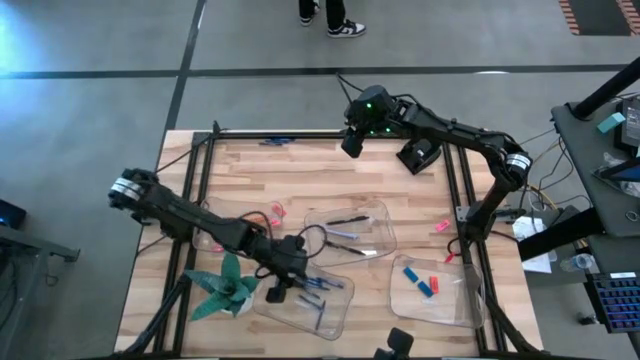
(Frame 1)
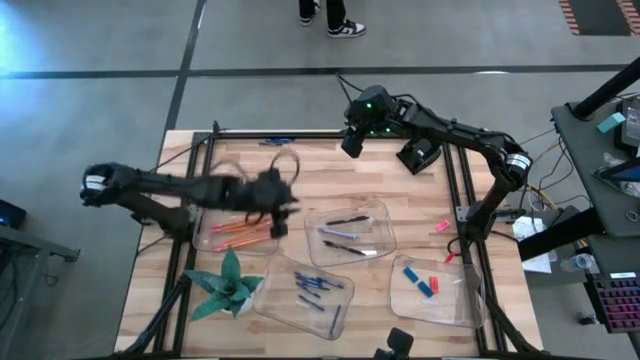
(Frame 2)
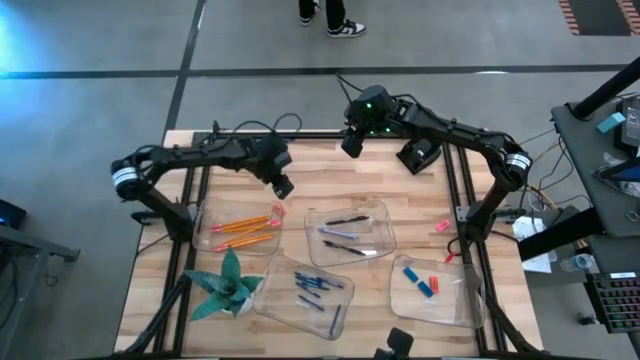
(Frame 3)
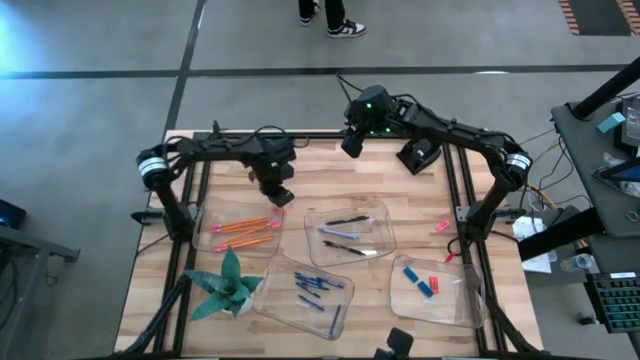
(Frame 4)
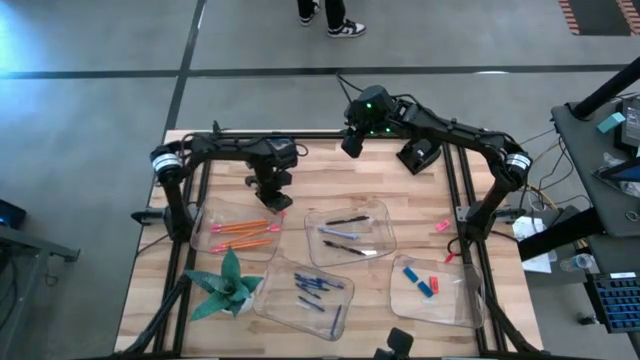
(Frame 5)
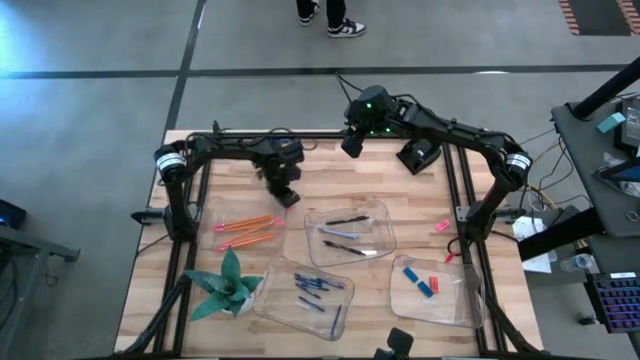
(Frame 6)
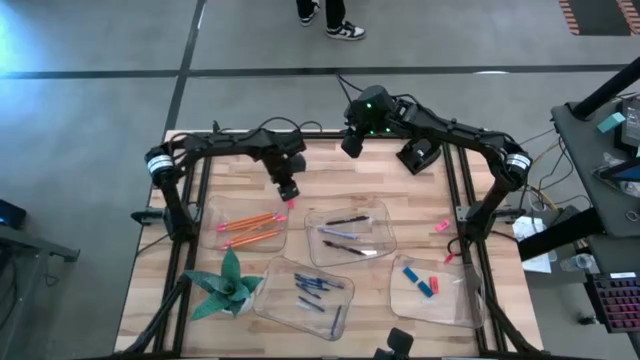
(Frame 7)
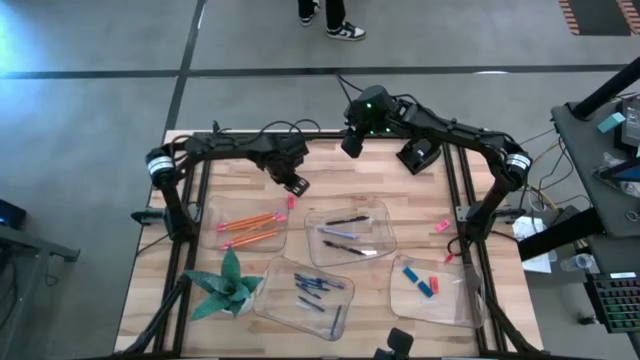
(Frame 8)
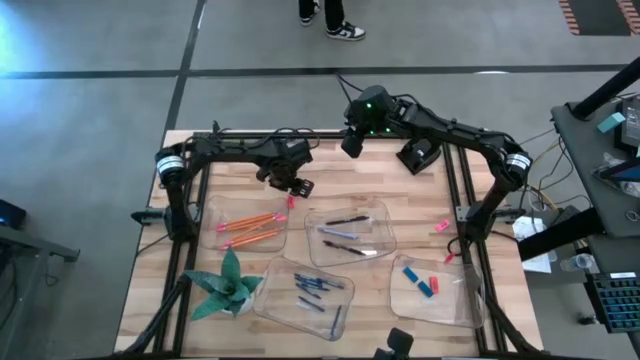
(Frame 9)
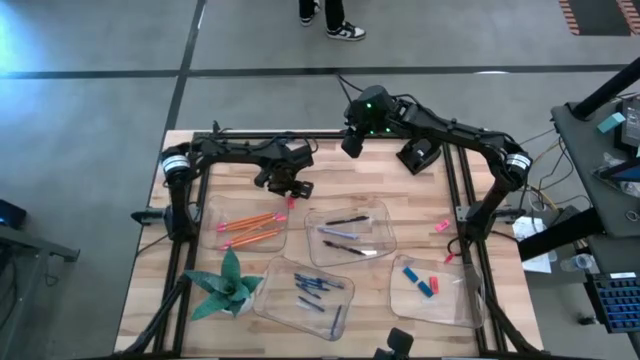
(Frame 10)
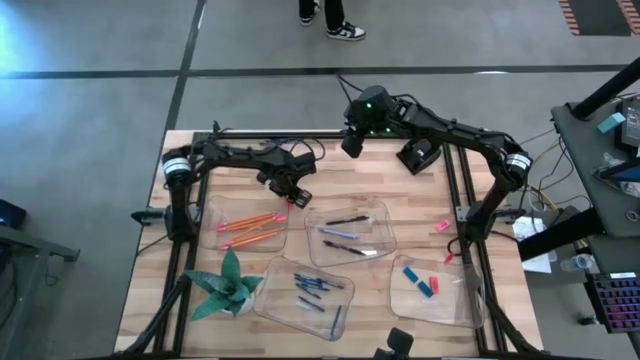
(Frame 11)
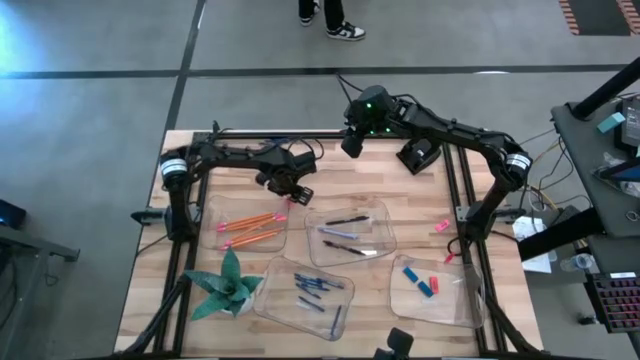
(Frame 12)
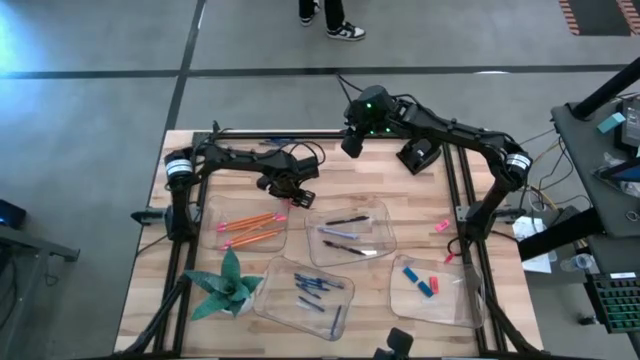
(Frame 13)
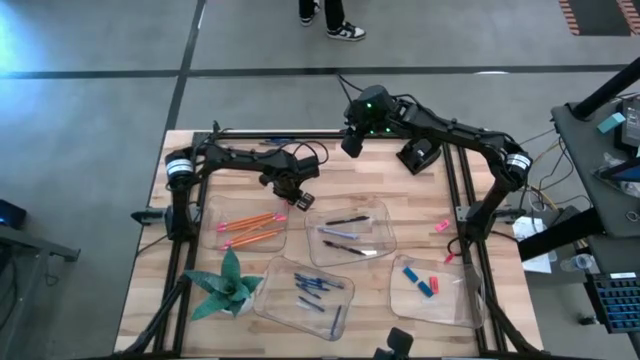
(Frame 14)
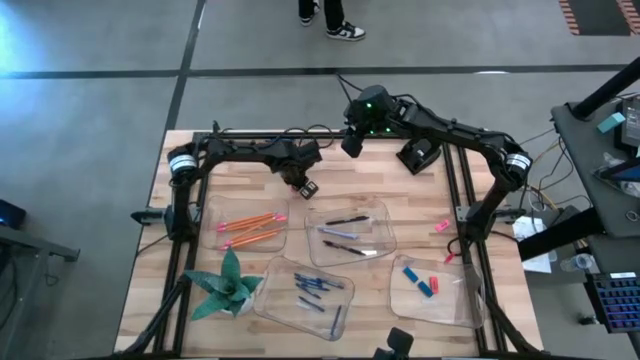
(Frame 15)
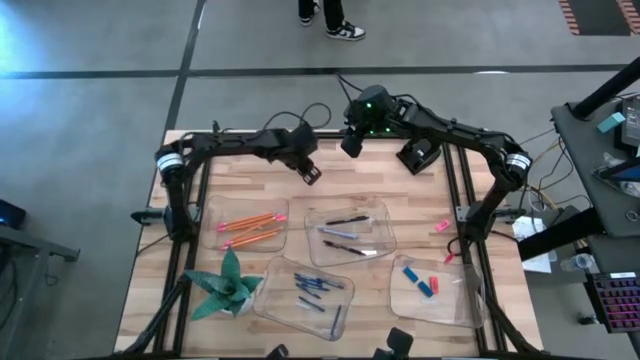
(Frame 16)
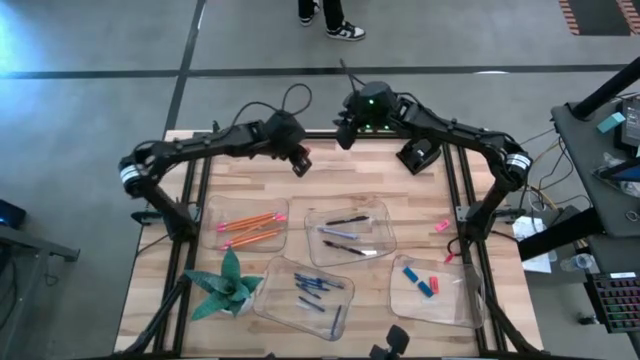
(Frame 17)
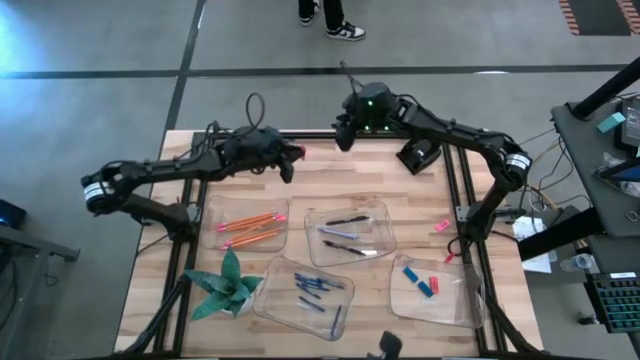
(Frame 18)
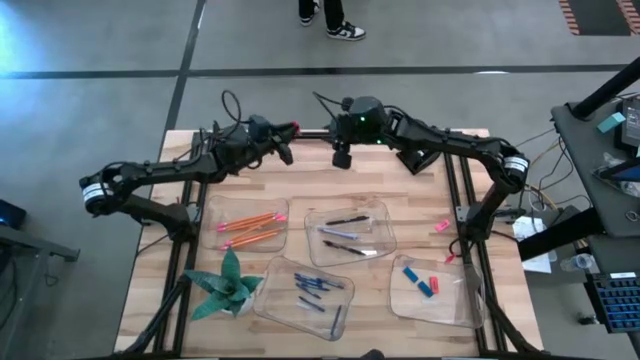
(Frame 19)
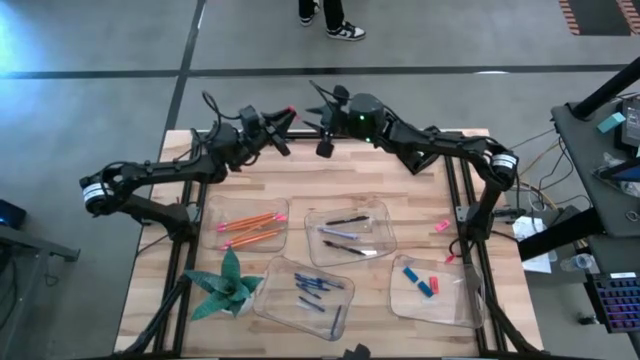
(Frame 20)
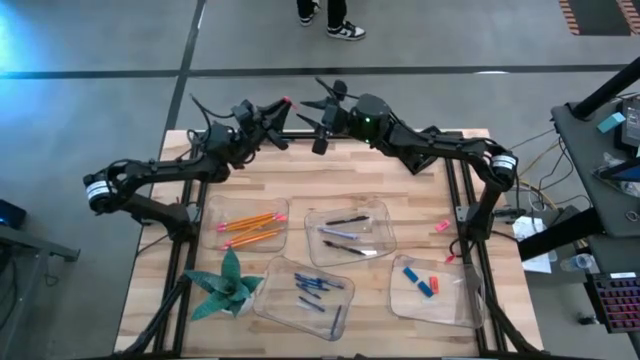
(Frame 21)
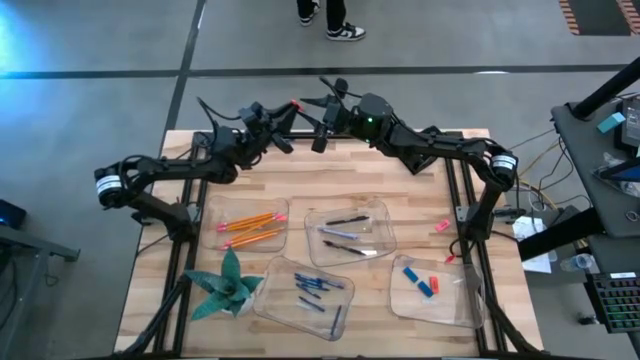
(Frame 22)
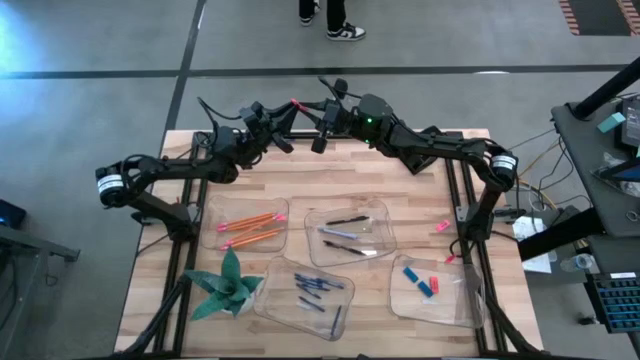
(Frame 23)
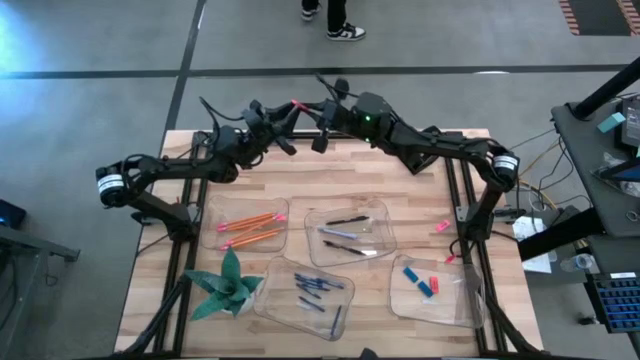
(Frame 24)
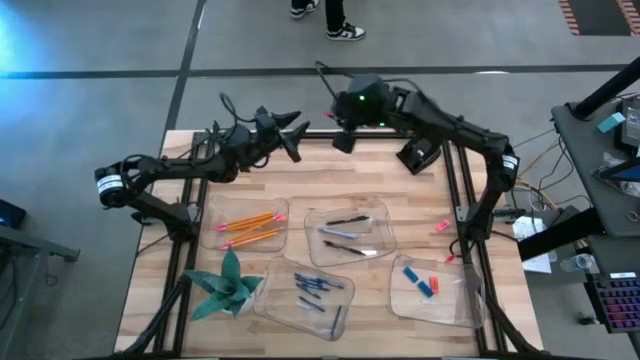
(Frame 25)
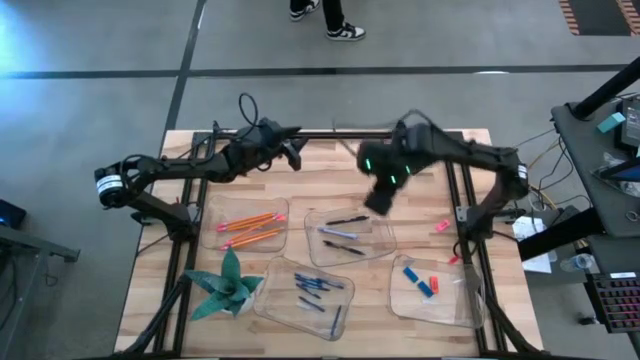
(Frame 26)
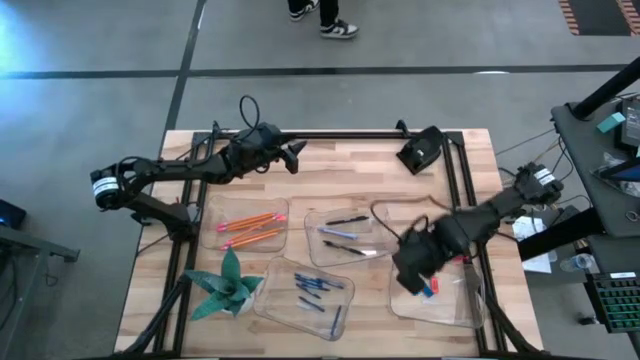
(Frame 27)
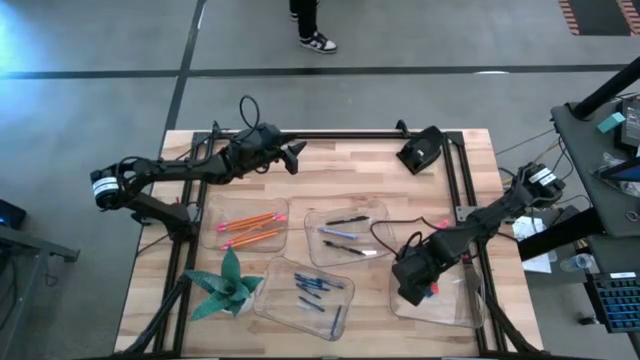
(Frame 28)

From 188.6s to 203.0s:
Task: Sort crayons/erasers/pens/pencils in bins
Put the orange eraser into the bottom right transparent bin

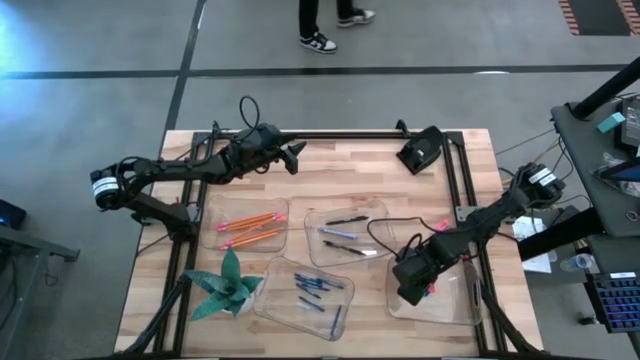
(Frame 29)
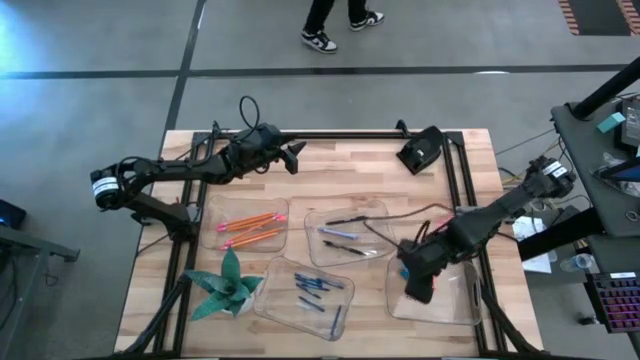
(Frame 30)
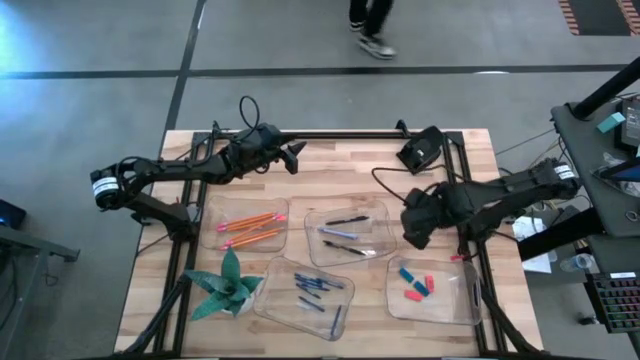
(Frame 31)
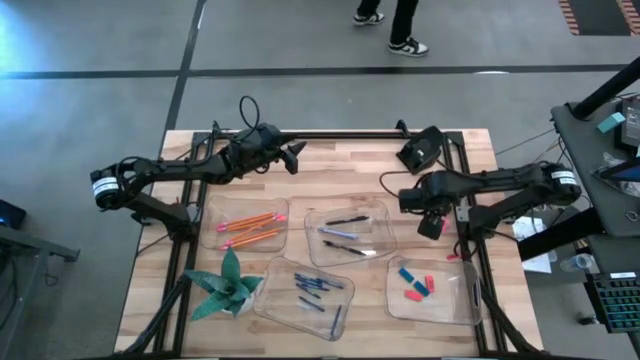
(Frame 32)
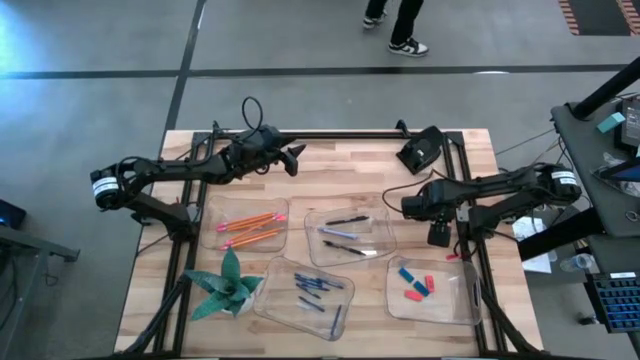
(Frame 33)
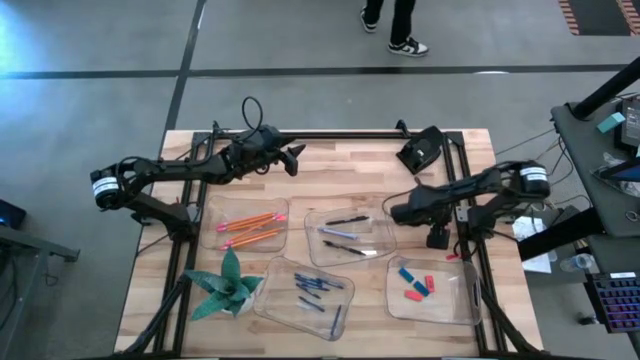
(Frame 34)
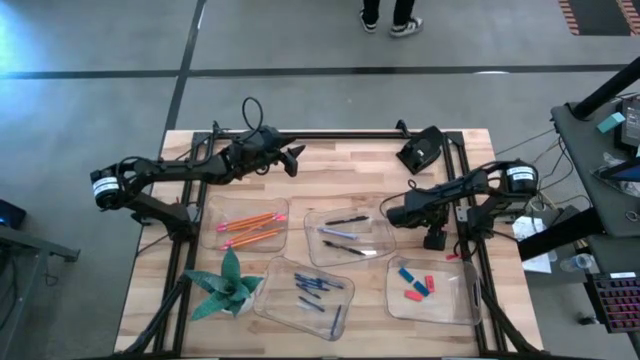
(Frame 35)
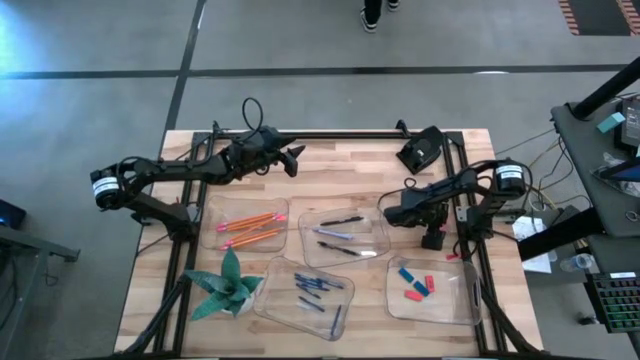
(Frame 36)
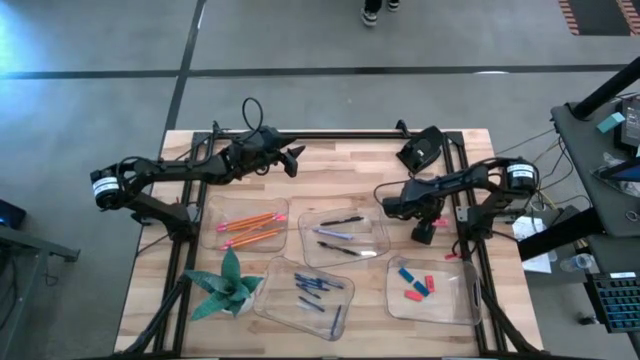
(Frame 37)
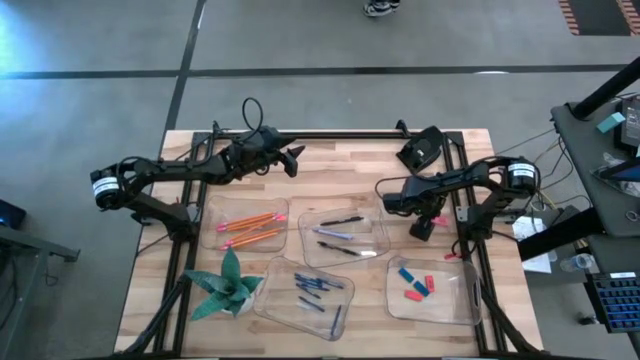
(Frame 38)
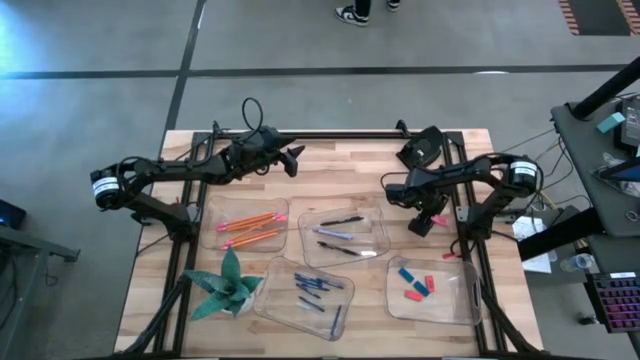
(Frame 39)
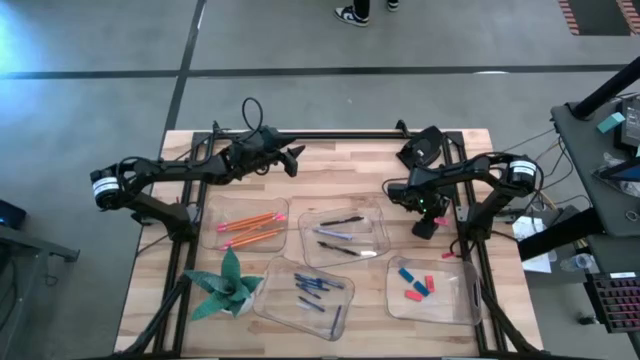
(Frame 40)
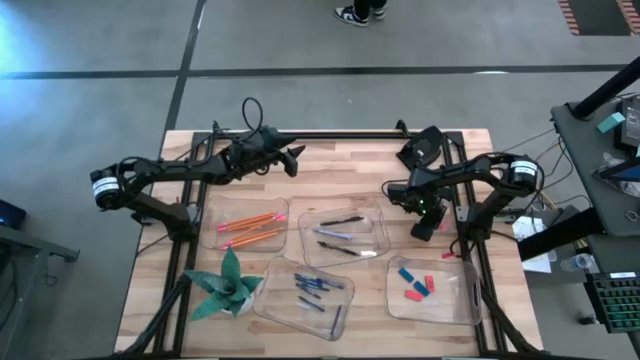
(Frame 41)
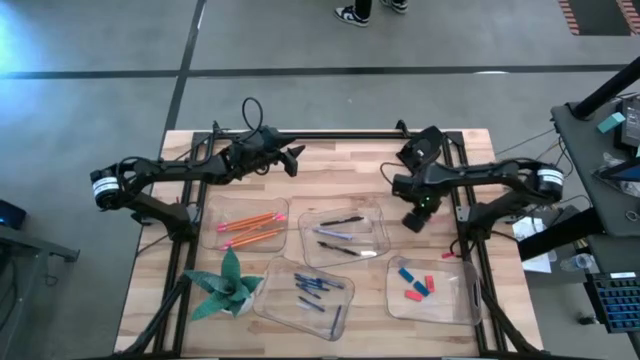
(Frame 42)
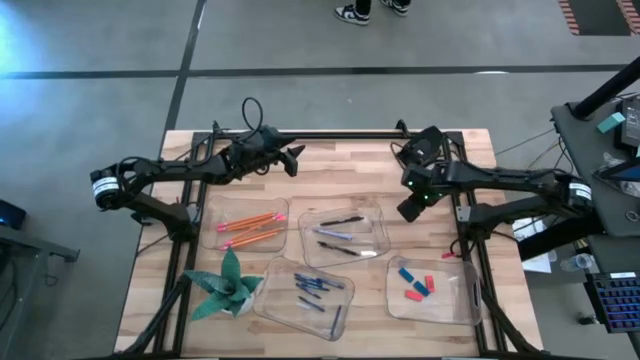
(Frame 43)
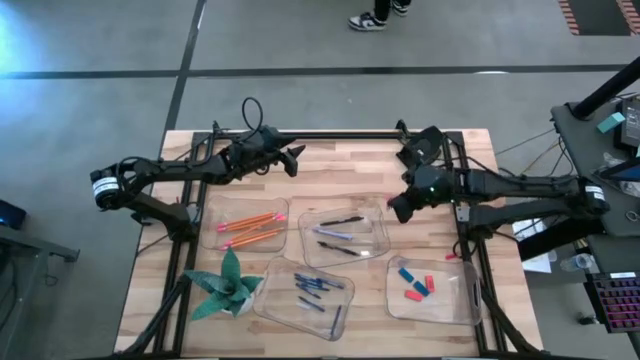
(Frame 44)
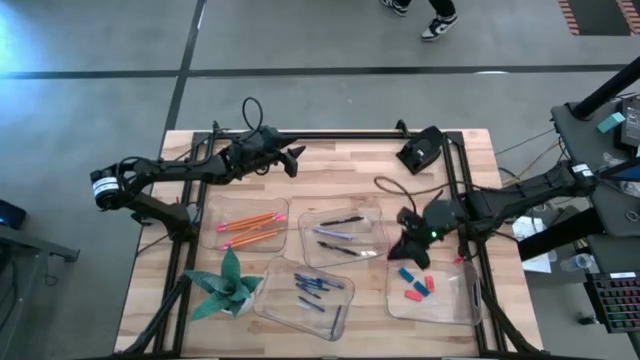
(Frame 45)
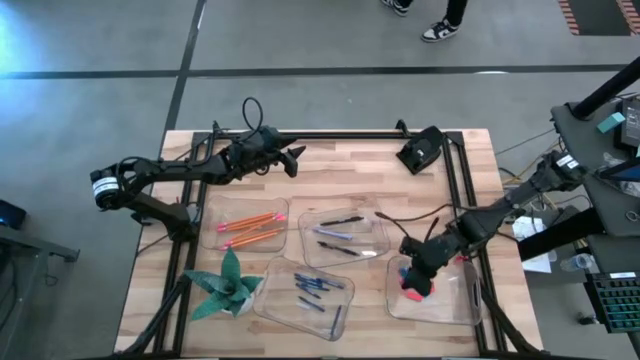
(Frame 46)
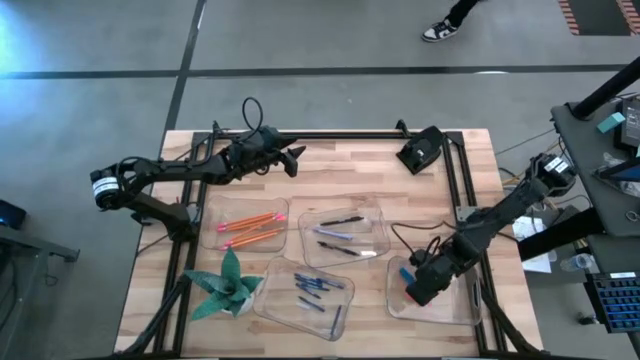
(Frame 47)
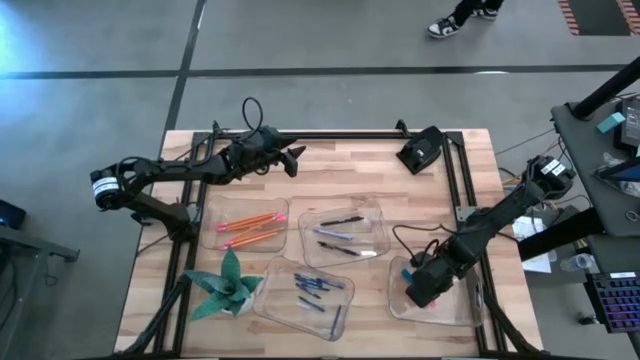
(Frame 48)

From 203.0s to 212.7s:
Put the pink eraser into the bottom right transparent bin
